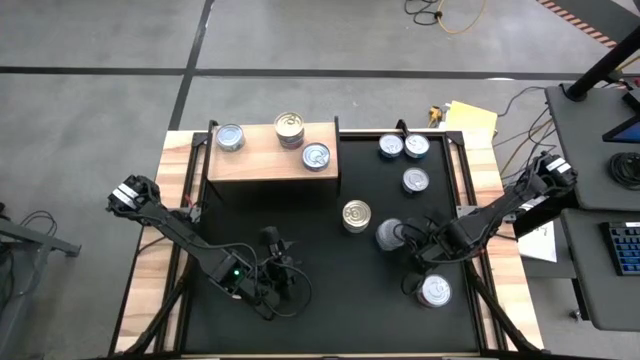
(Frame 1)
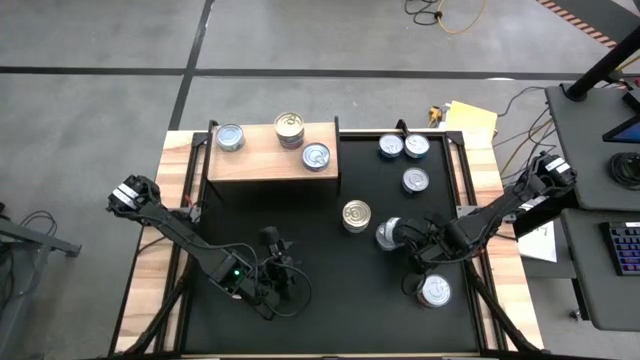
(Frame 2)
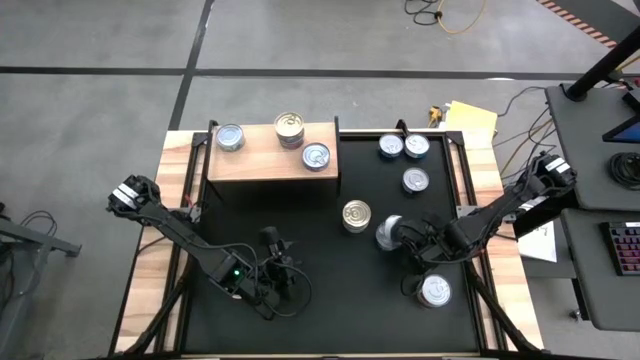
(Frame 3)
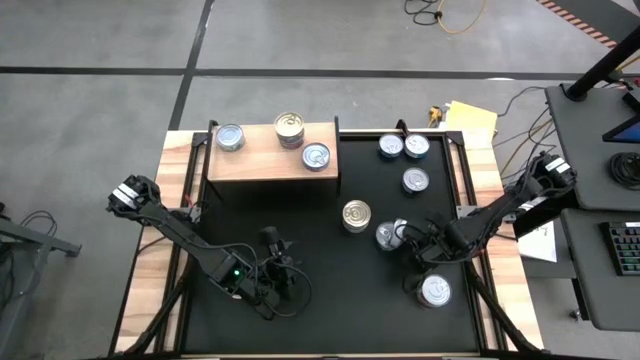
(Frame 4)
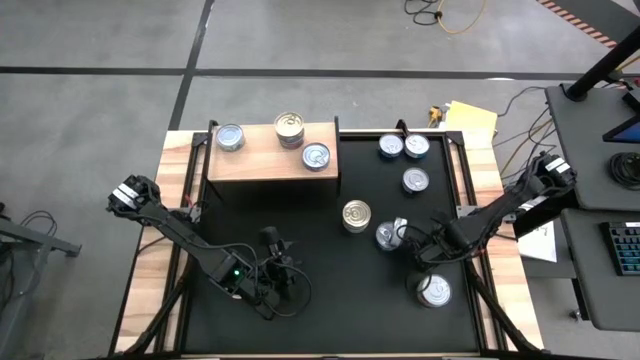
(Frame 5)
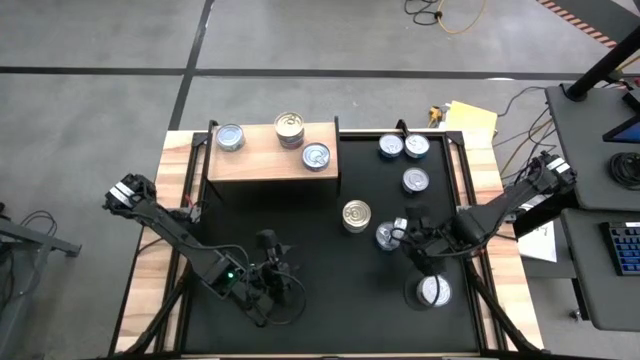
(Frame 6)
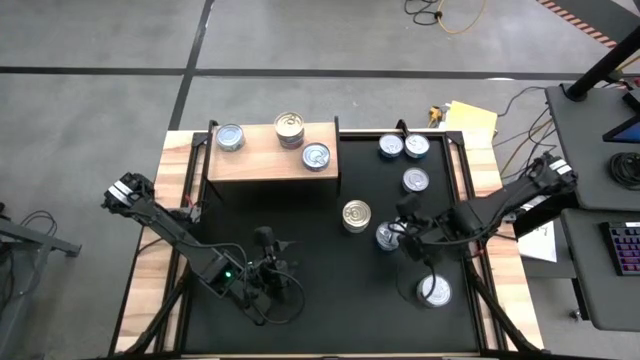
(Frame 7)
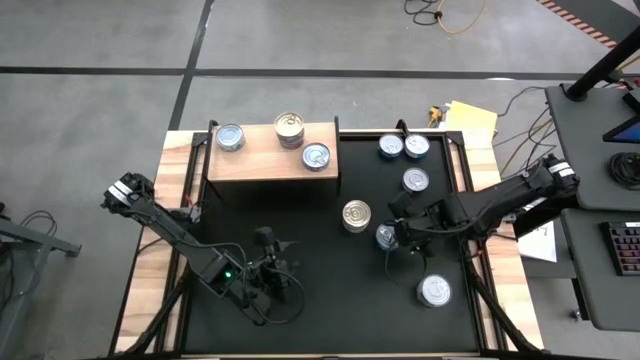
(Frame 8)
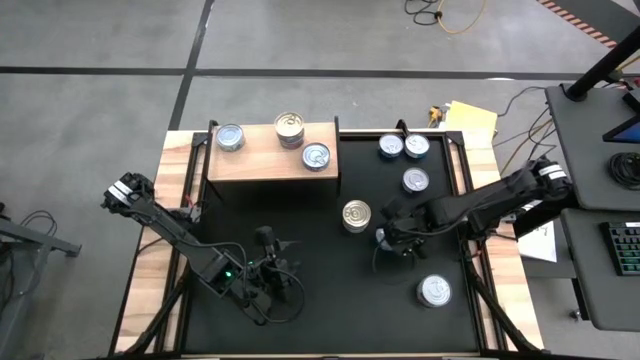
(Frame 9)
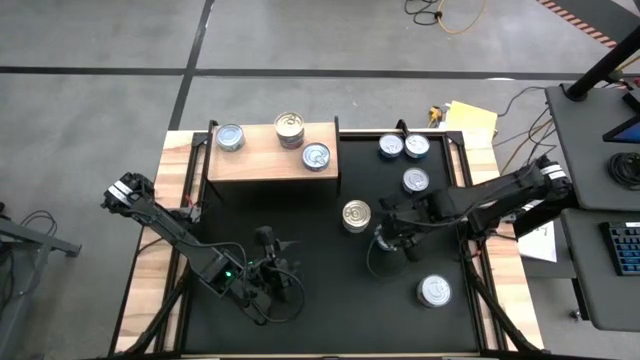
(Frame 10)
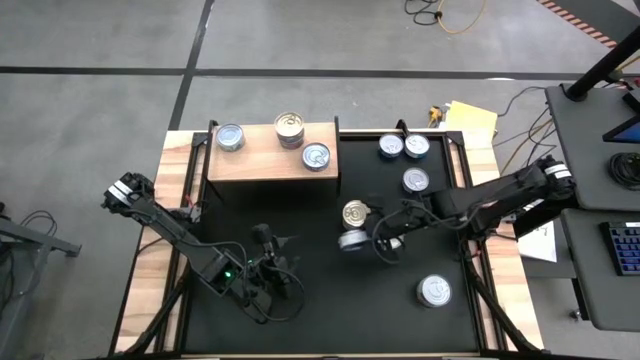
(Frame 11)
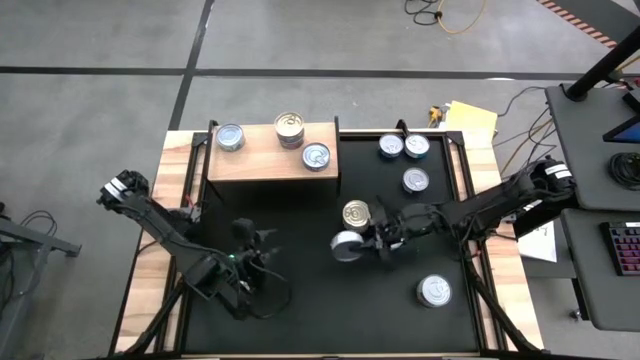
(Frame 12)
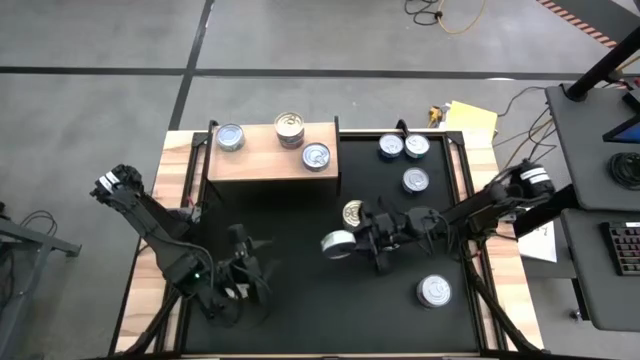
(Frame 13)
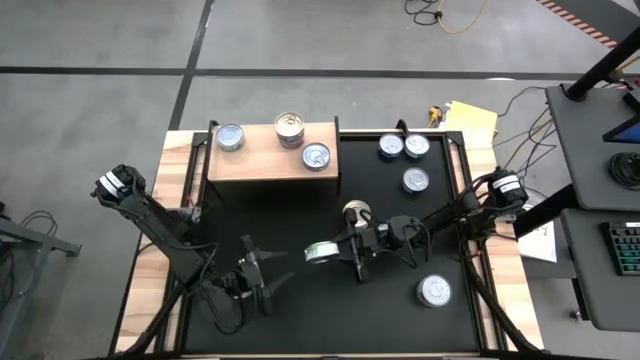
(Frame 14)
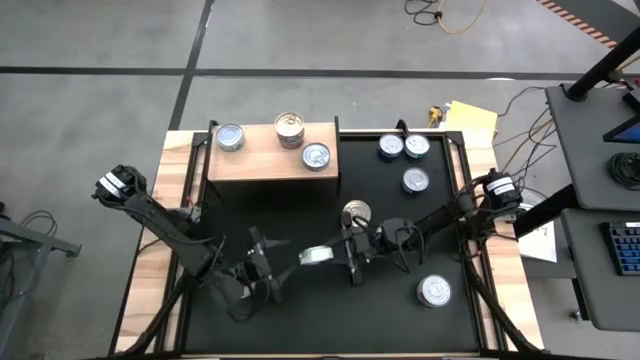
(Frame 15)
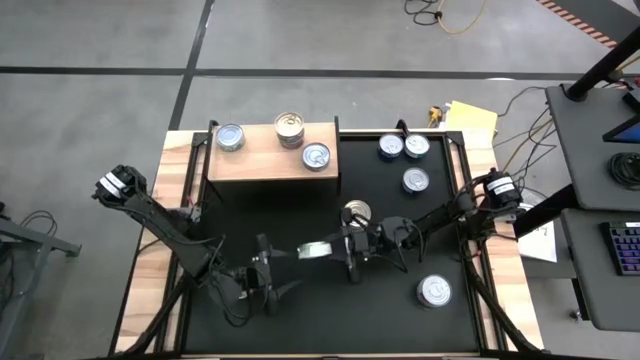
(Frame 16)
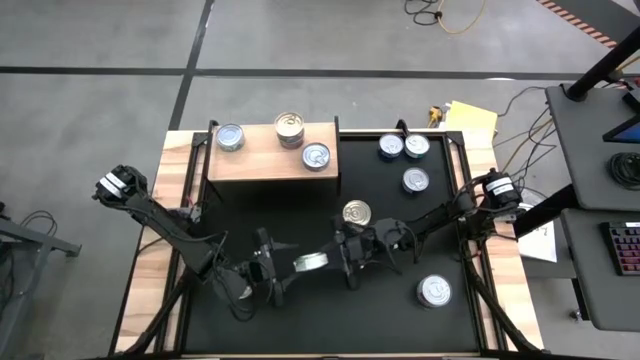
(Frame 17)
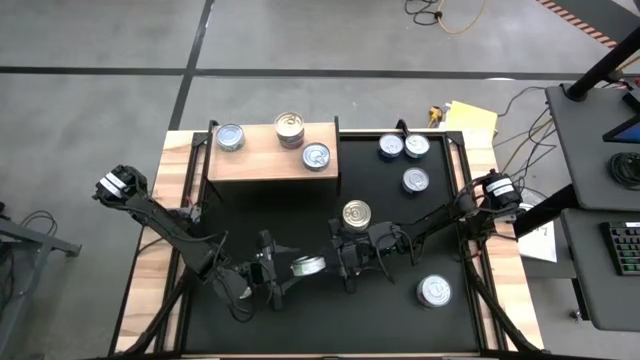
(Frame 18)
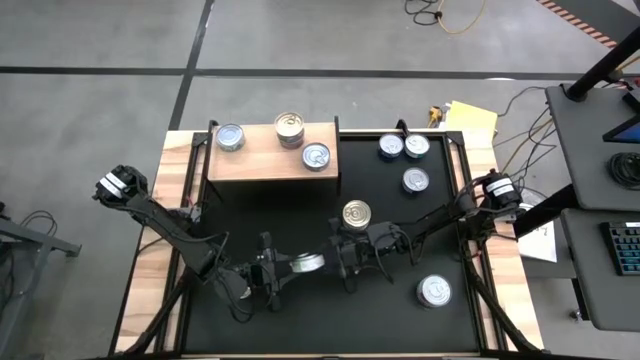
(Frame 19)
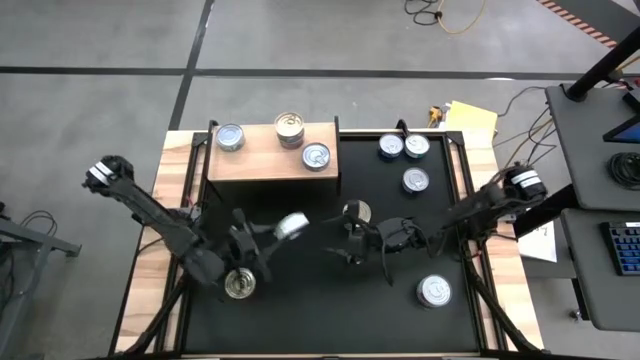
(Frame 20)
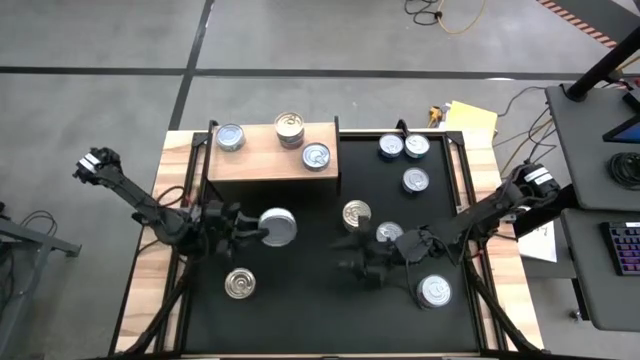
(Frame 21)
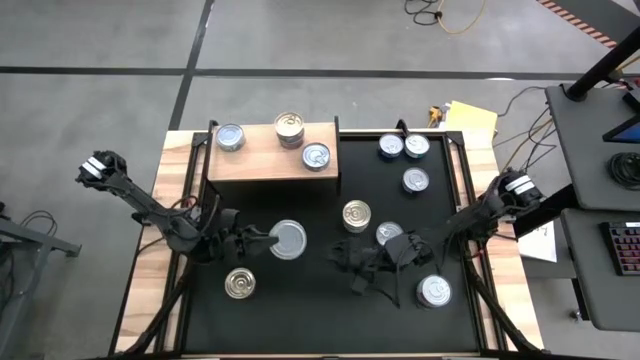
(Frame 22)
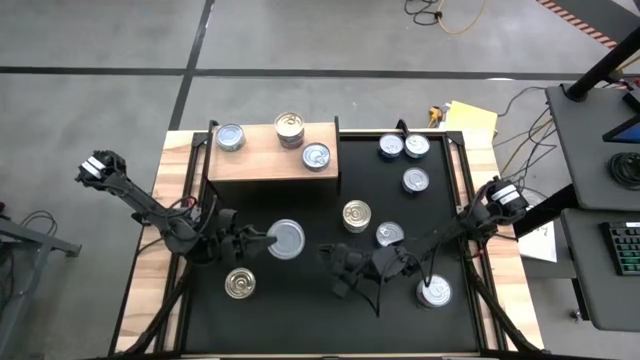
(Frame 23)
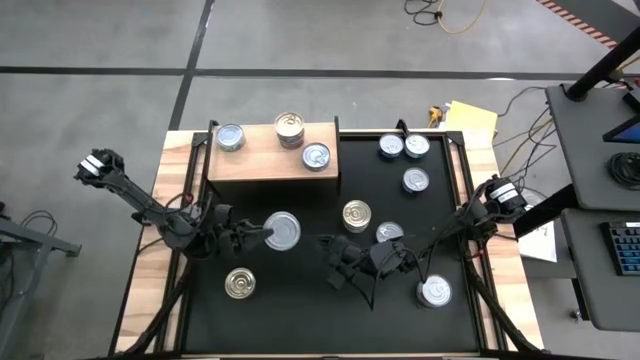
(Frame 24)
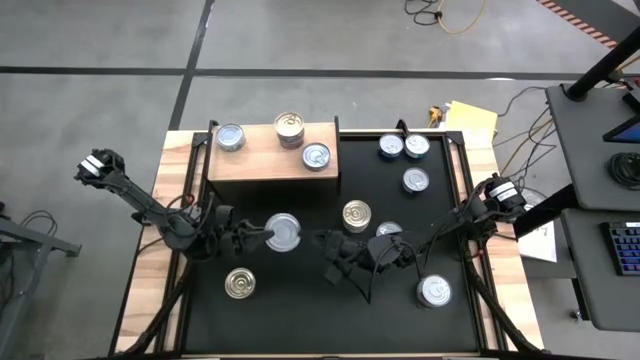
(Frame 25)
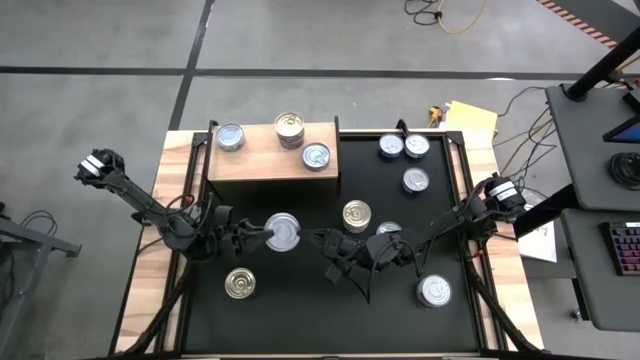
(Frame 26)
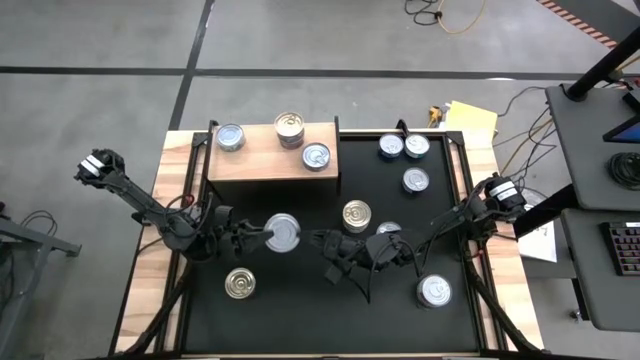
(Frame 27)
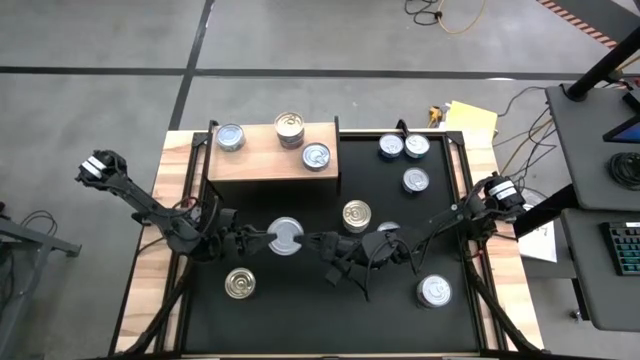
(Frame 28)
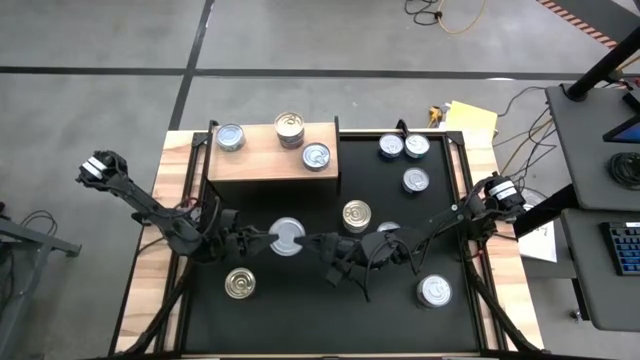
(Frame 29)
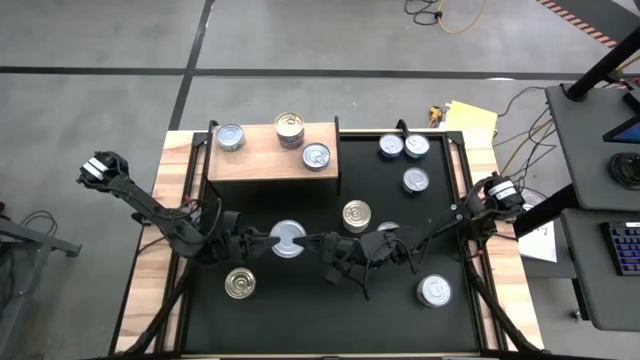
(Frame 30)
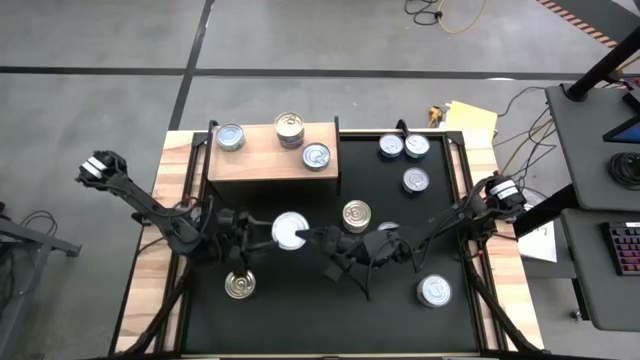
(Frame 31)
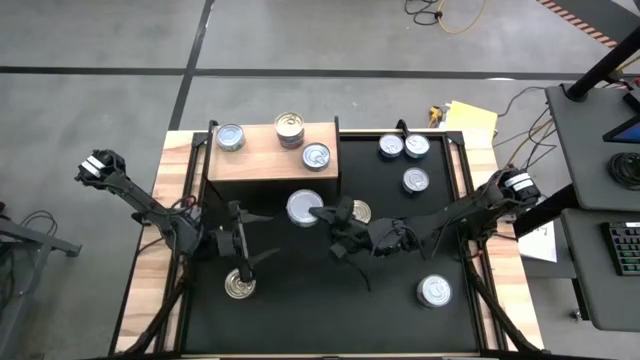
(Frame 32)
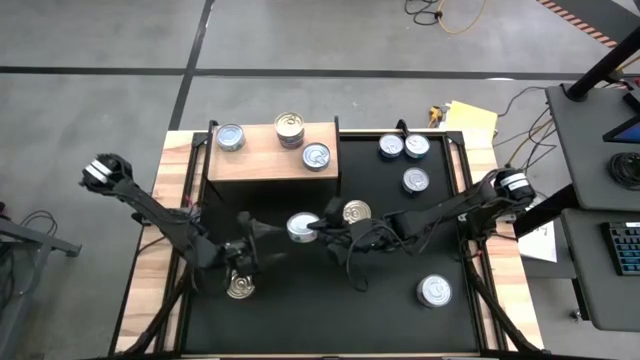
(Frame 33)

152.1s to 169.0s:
Task: Stack canned seafood by type on shelf
Stack the green/white tuna can on top of the other green/white tuna can on the shelf

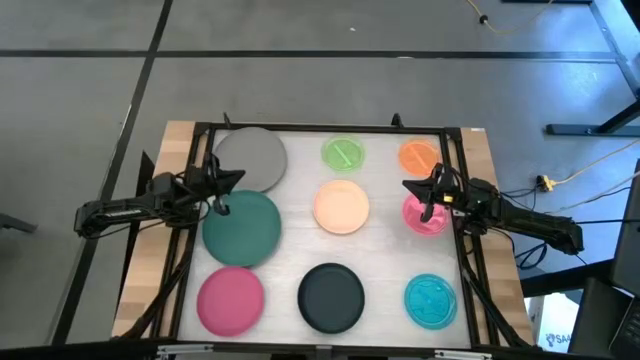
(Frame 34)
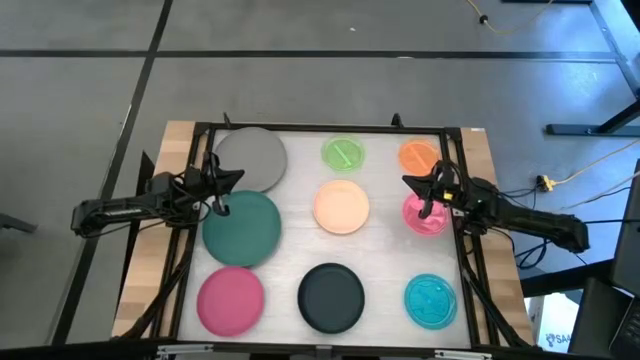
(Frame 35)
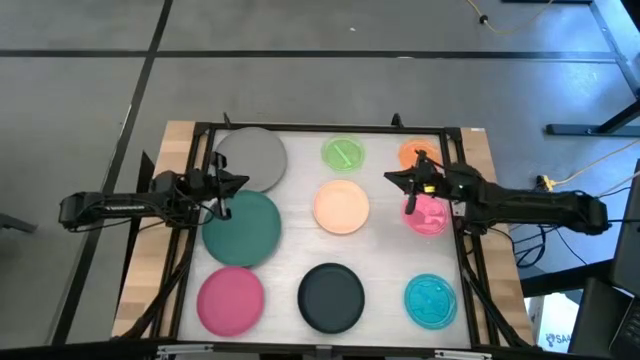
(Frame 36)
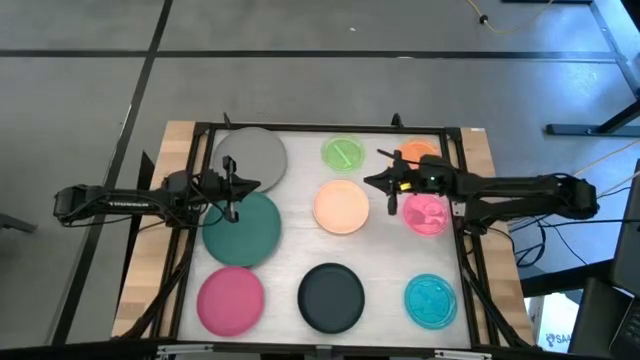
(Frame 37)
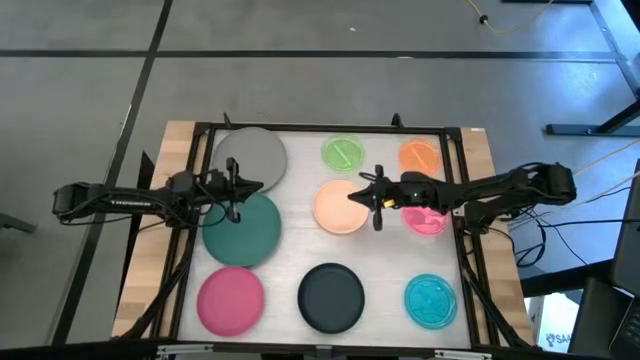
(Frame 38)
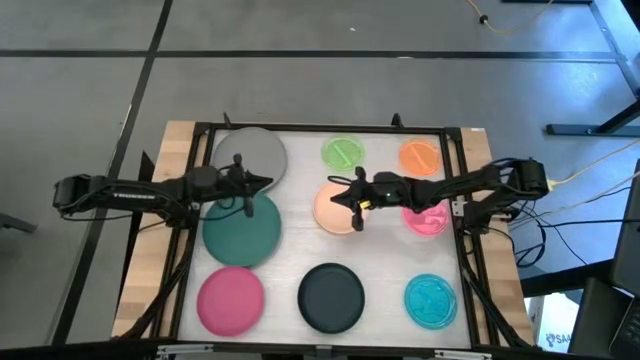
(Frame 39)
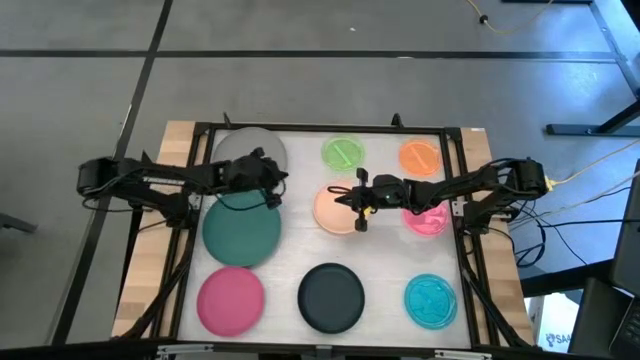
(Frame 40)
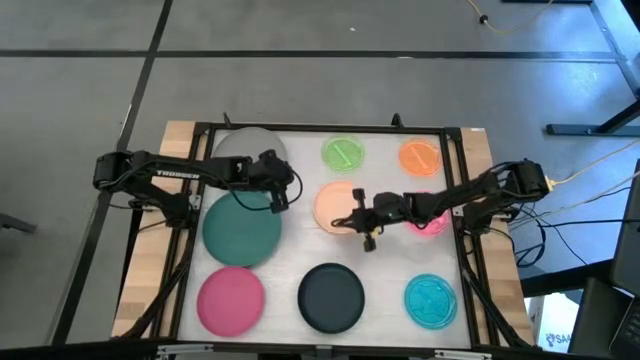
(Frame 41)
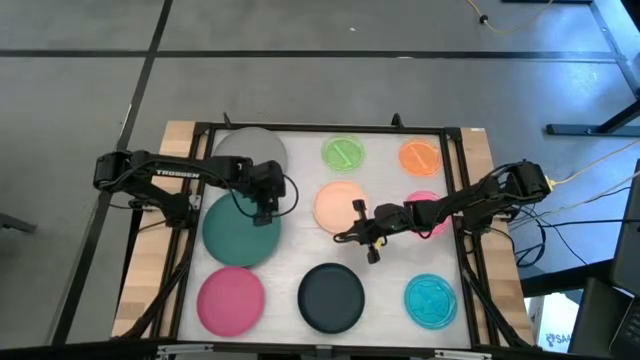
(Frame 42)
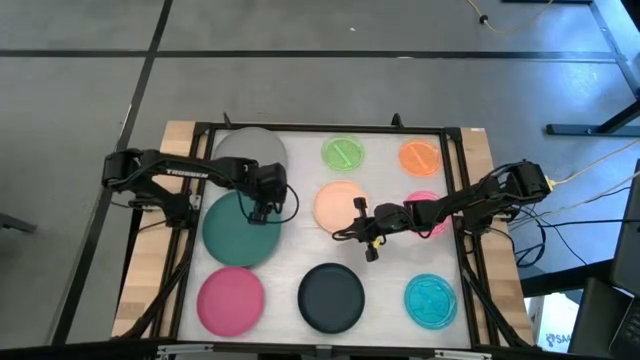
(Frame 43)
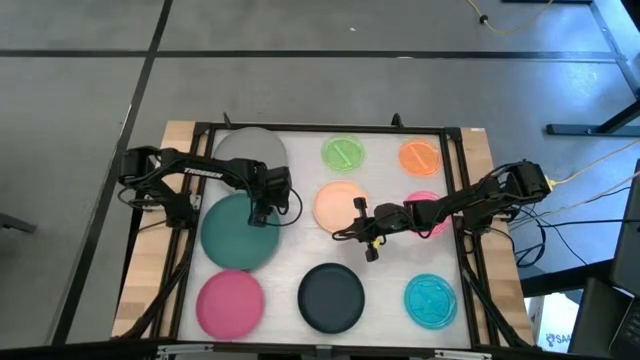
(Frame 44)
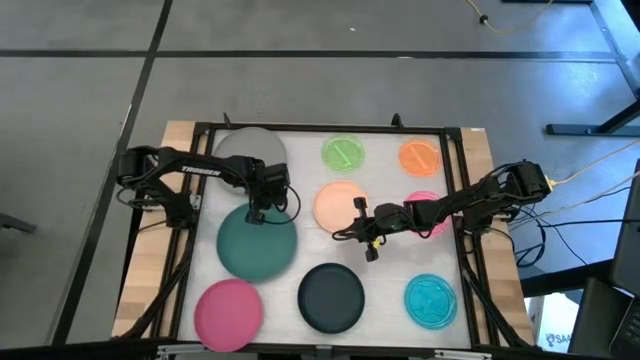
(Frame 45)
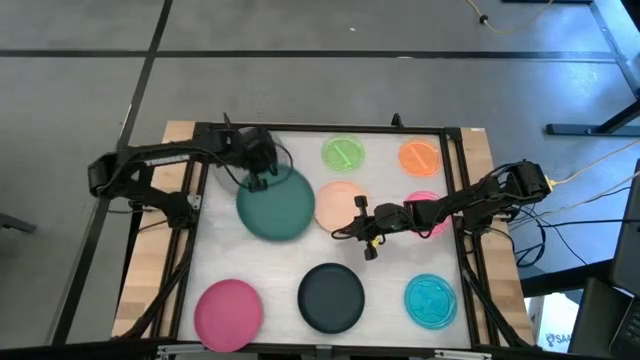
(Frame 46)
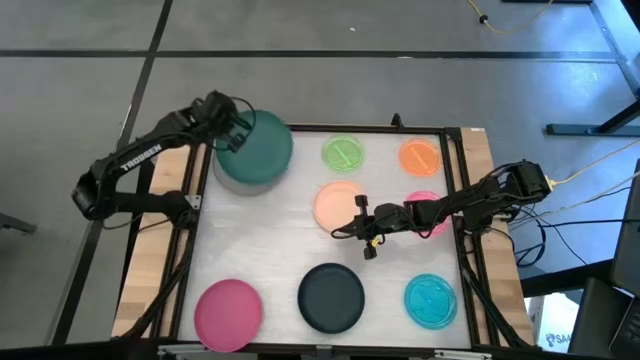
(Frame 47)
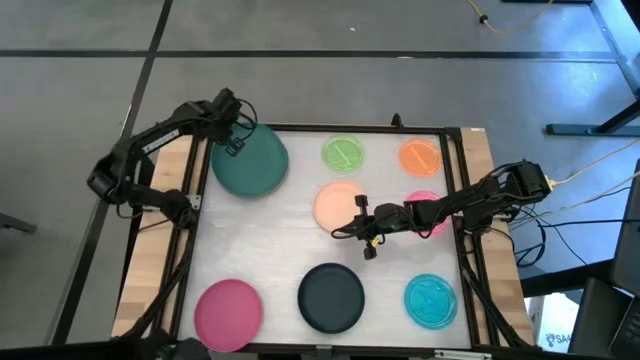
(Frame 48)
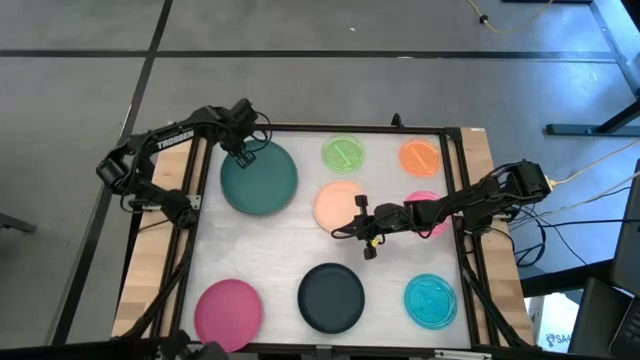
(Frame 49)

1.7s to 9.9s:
Task: Stack plastic plates
Stack the dark green plate on top of the gray plate
